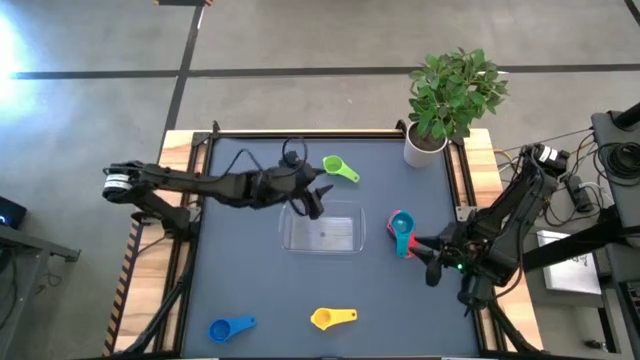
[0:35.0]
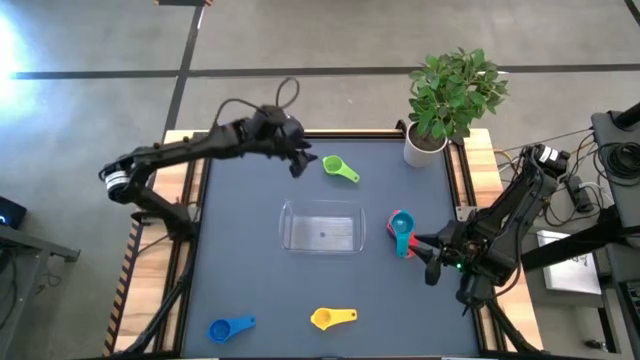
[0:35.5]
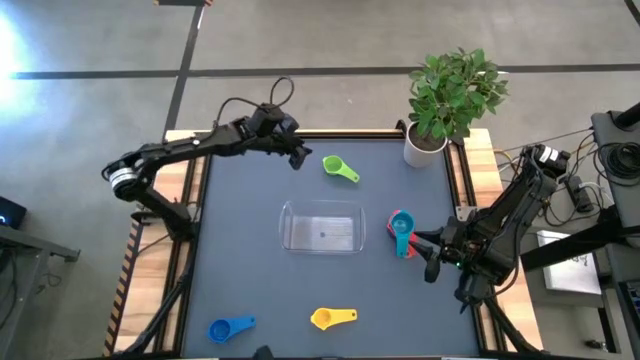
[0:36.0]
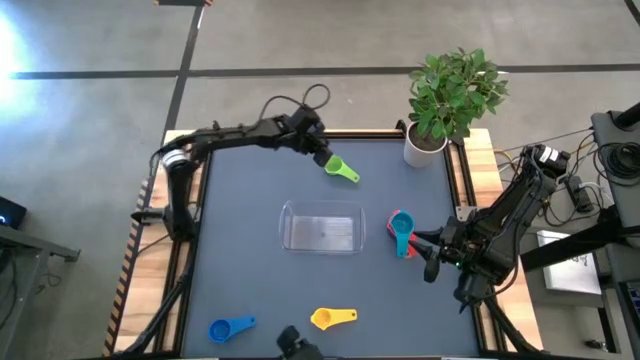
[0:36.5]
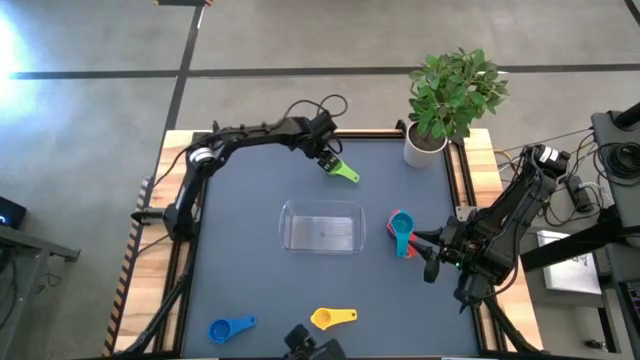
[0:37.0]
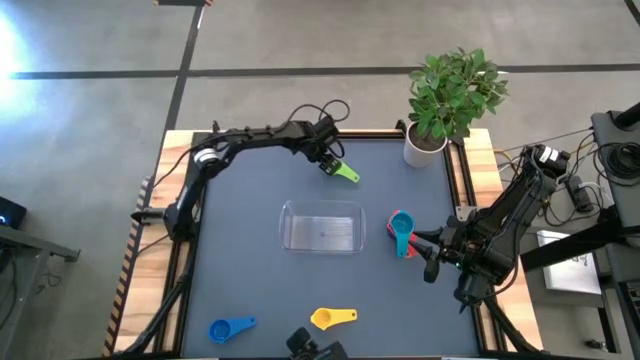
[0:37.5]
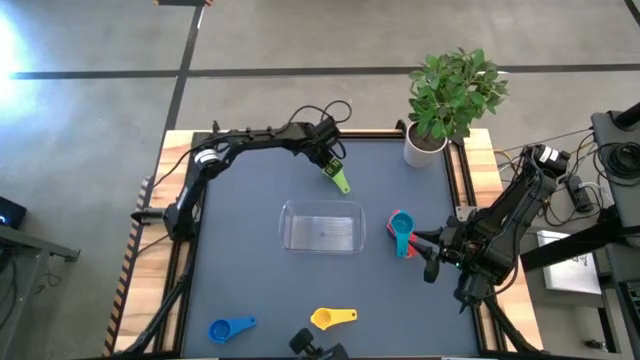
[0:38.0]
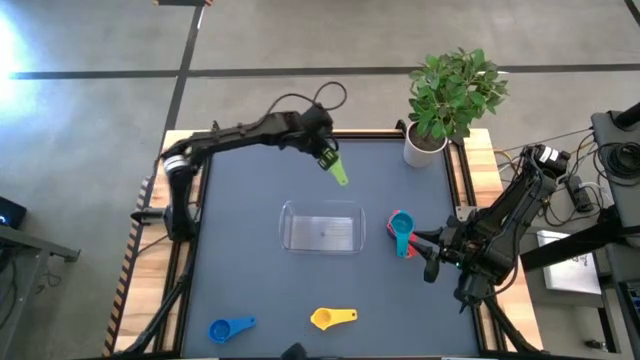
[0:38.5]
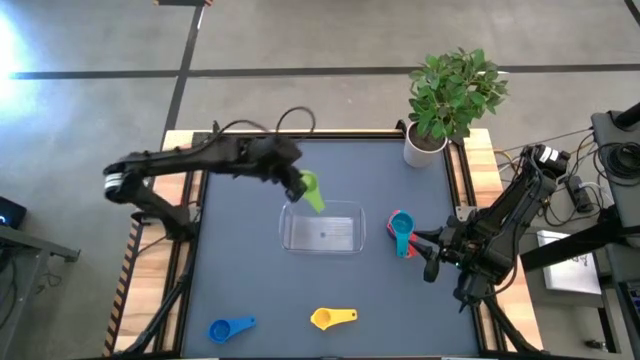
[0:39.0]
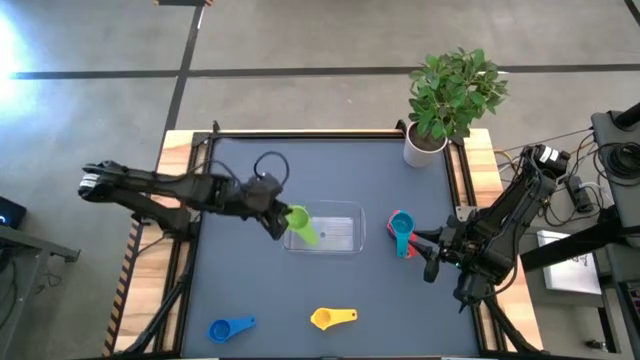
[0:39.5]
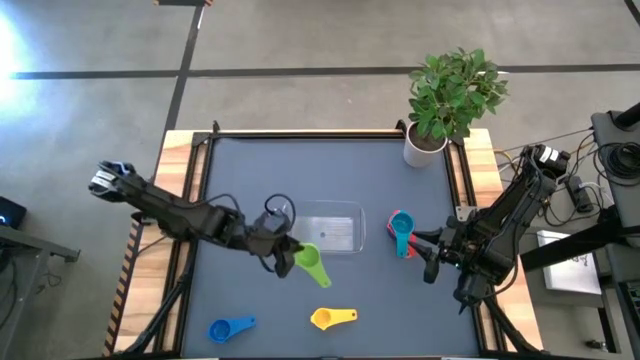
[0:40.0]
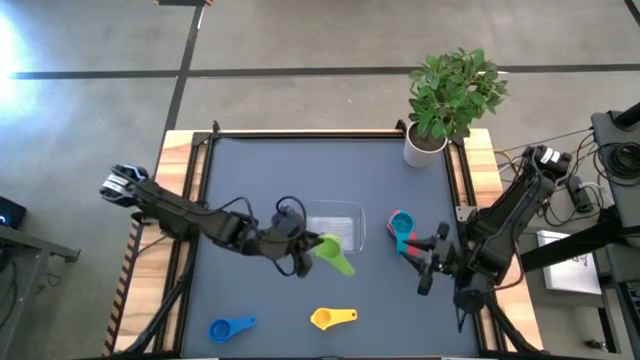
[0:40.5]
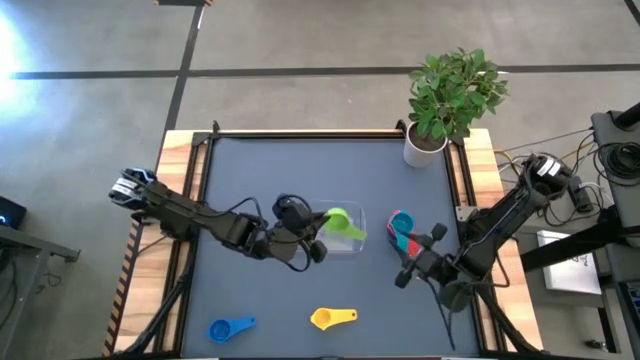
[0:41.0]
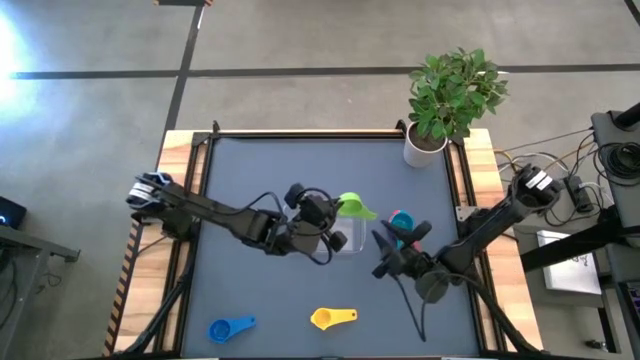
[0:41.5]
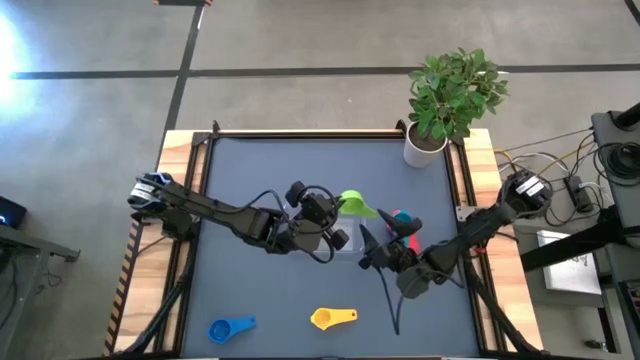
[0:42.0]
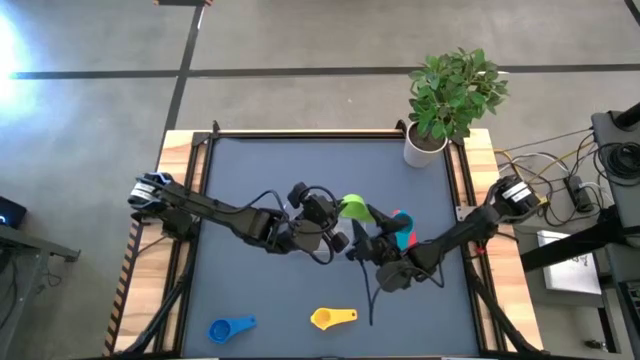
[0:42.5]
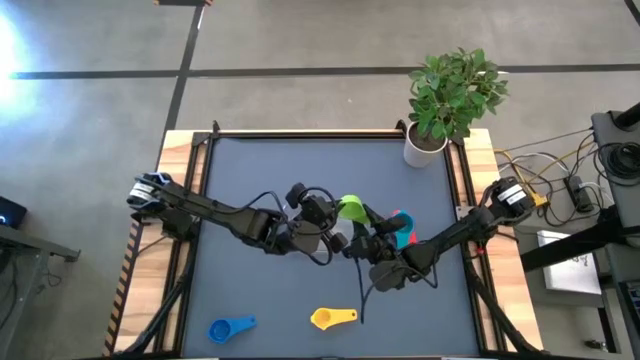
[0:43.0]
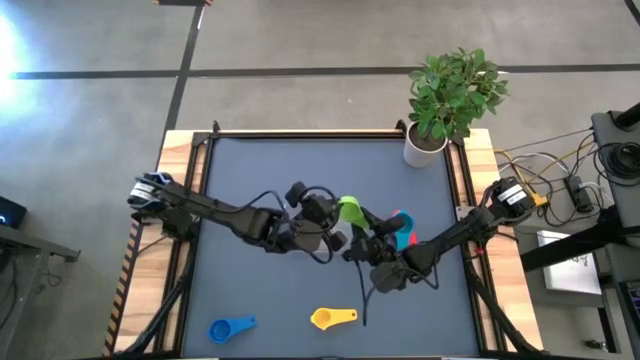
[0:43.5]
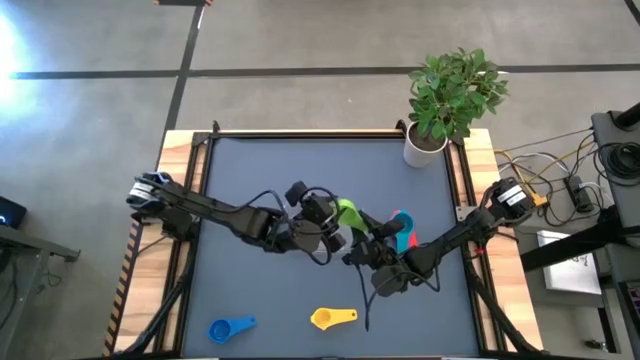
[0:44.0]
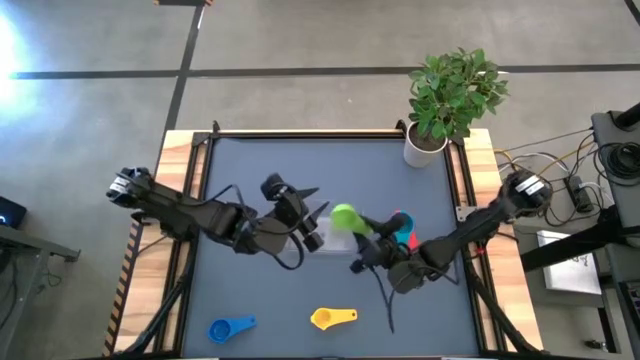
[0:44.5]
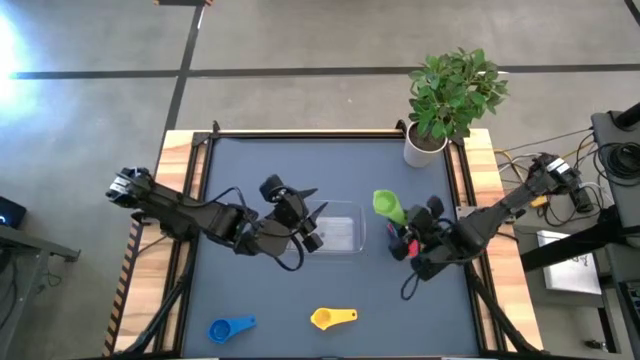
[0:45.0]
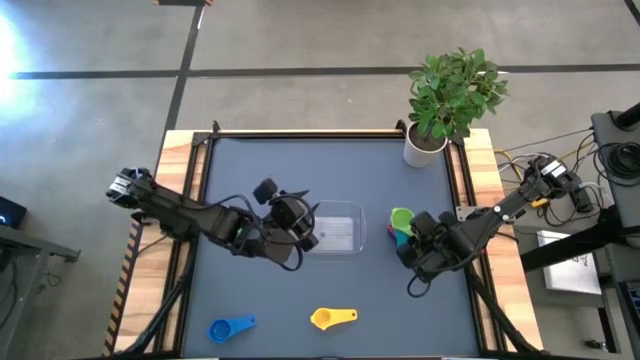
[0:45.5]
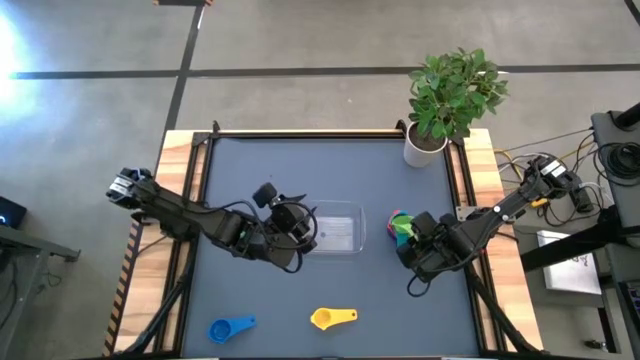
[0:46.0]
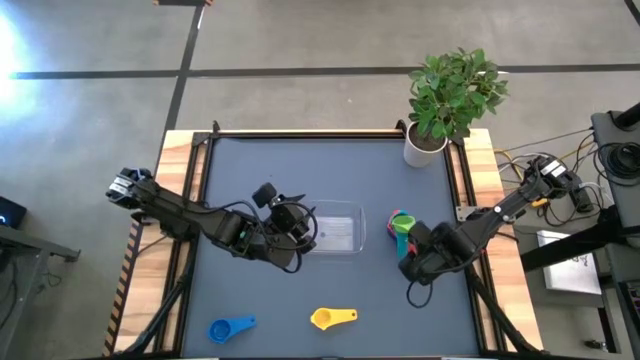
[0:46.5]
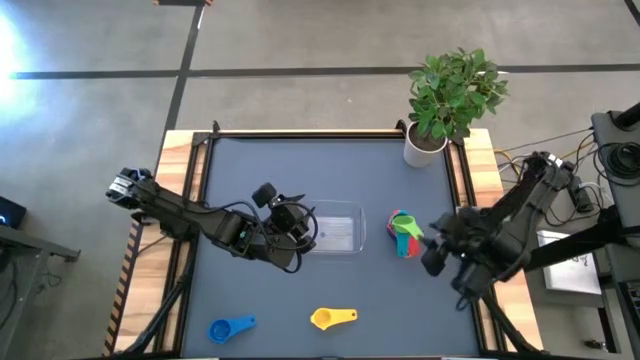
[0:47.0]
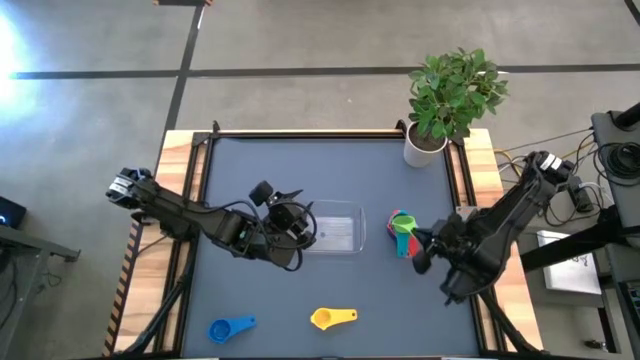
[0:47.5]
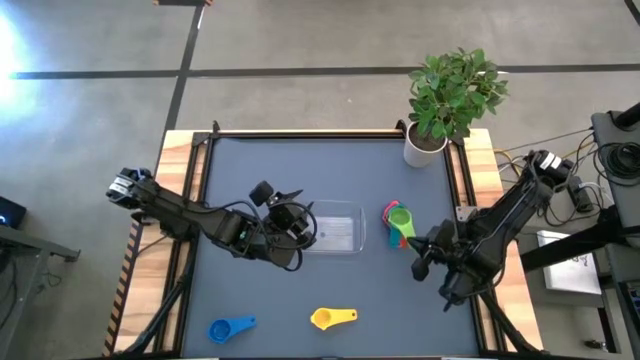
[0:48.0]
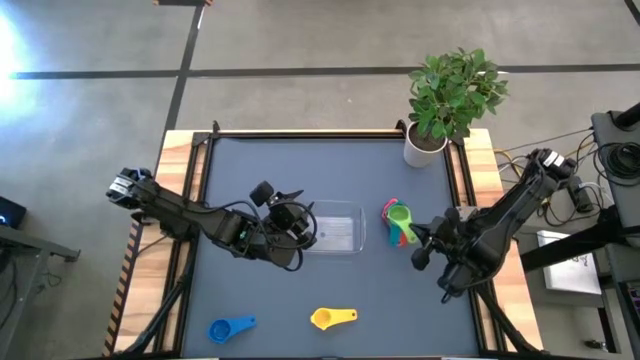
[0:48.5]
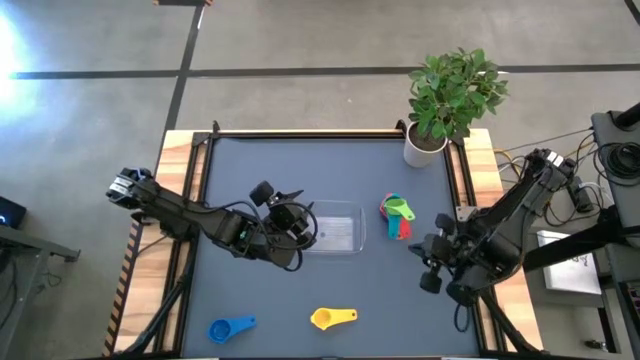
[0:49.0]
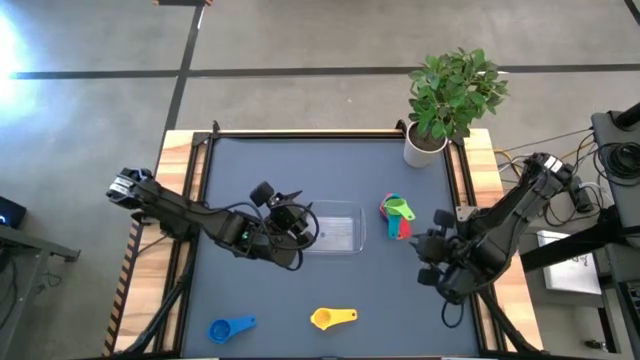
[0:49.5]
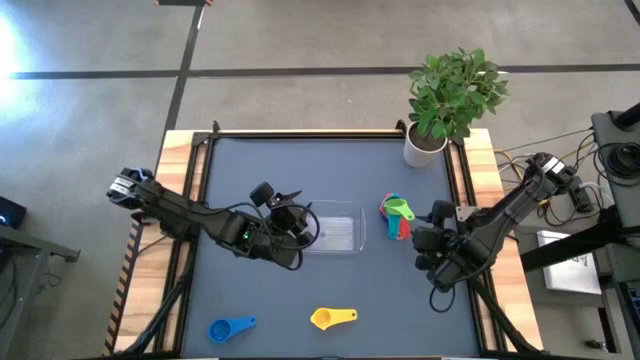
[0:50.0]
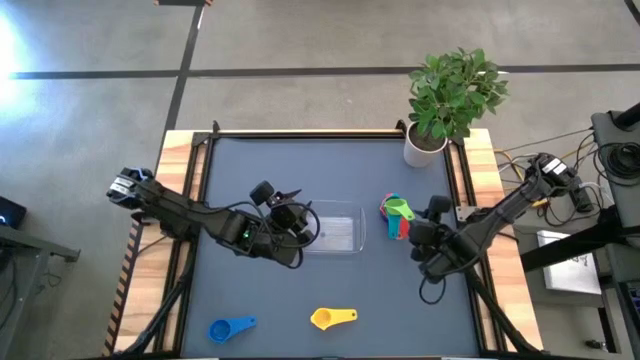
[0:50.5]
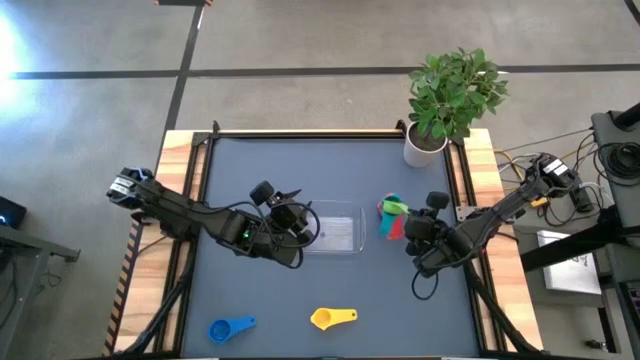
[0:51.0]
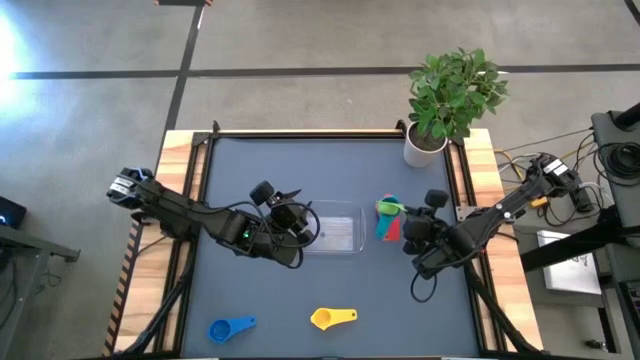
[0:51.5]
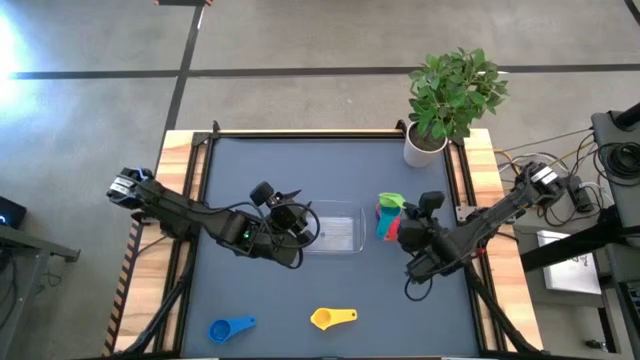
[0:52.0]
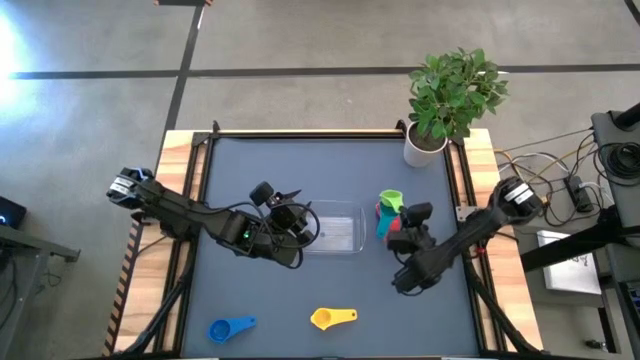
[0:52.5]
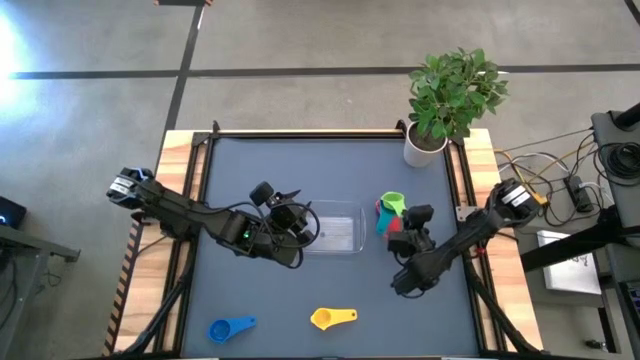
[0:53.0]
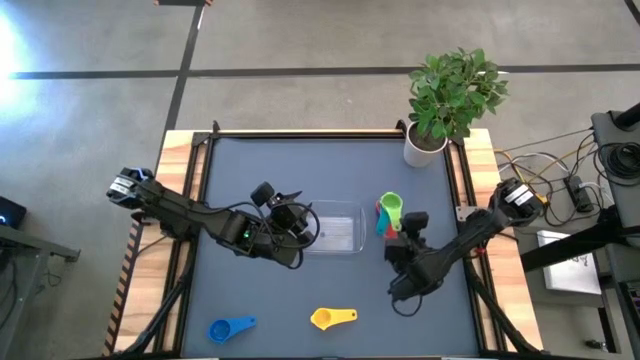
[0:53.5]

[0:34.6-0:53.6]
Task: Nest measuring cups in basket
Stack the green measuring cup on top of the light blue measuring cup

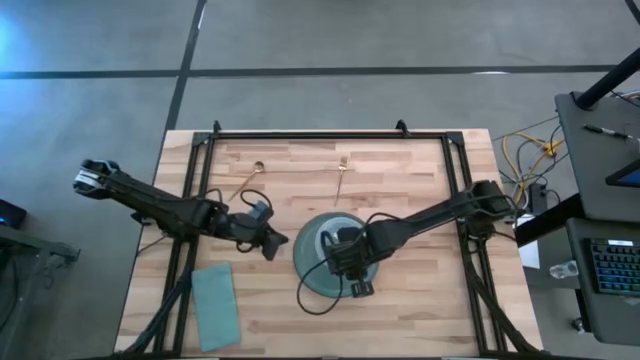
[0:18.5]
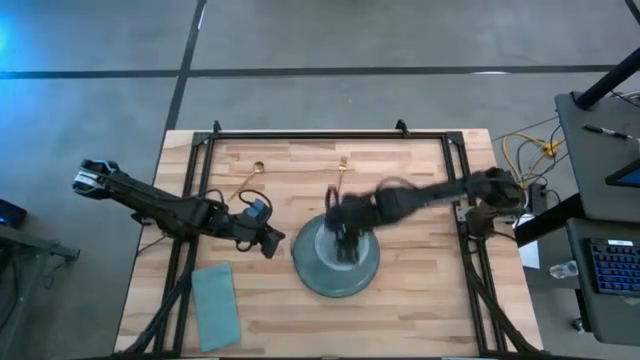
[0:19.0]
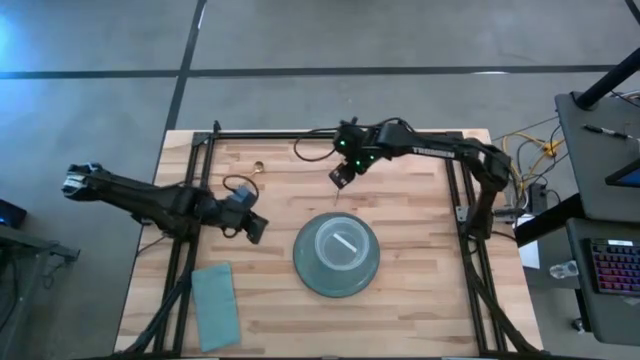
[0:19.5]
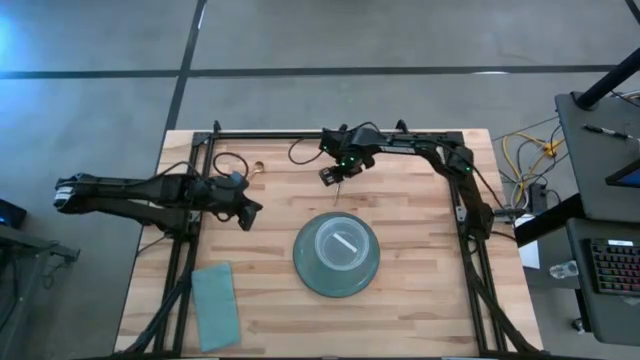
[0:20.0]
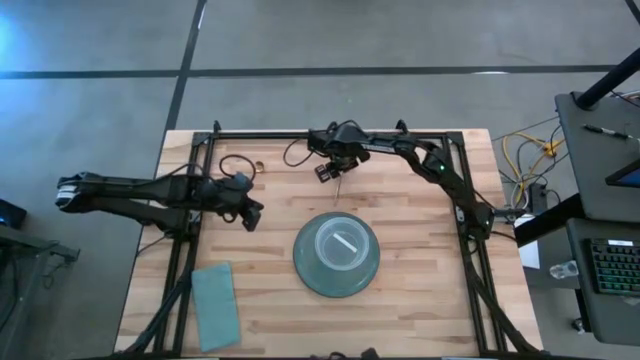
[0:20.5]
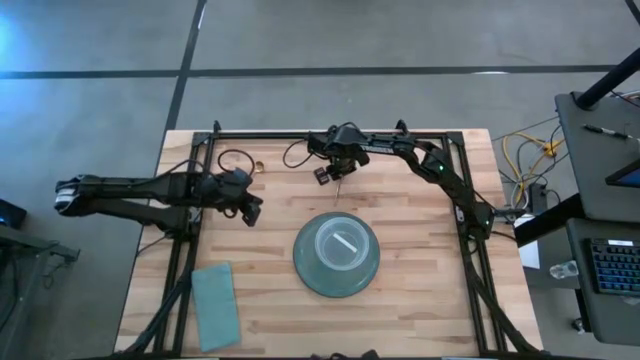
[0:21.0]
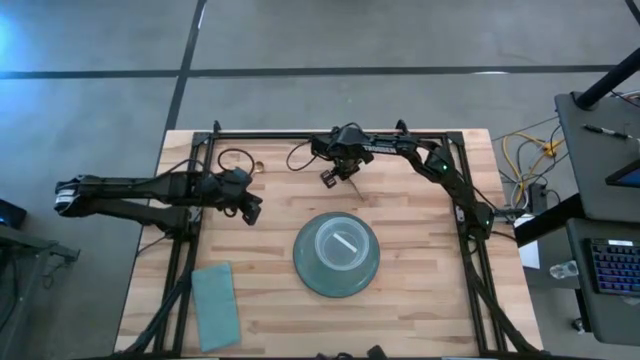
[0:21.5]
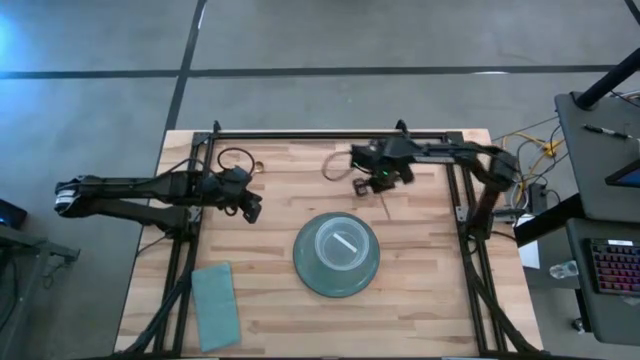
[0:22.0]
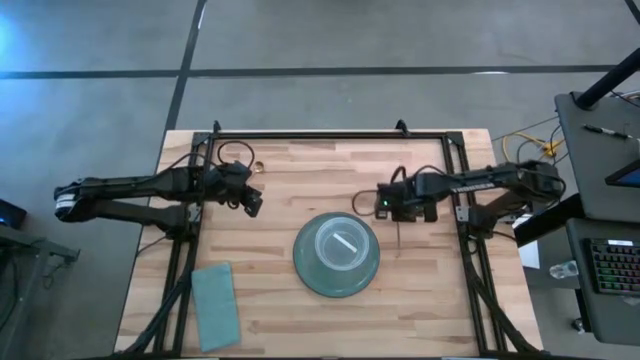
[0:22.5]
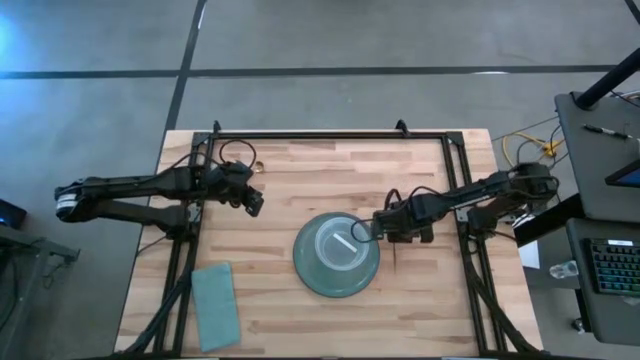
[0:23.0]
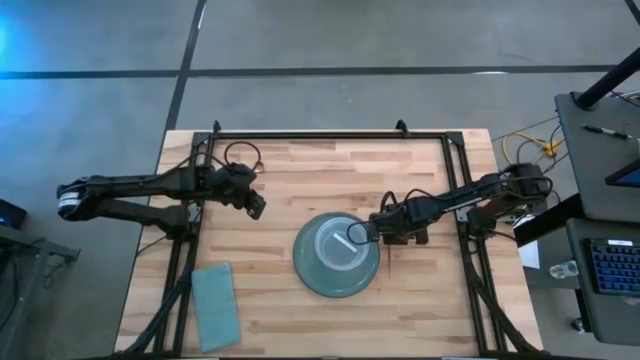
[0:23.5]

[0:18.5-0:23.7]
Task: Set table place
Put the fork beside the plate on the table
